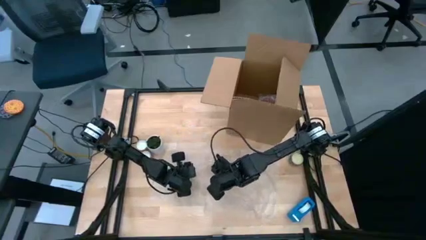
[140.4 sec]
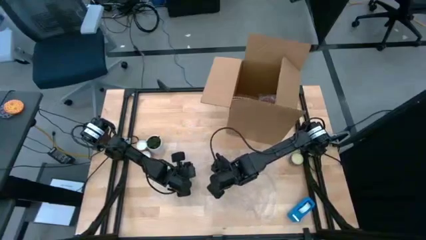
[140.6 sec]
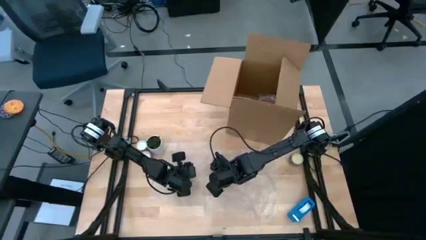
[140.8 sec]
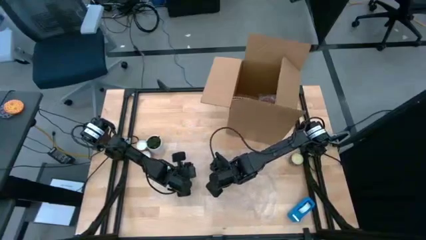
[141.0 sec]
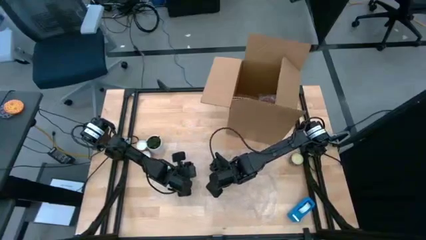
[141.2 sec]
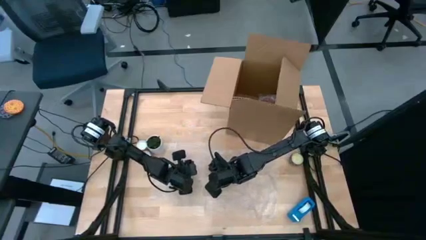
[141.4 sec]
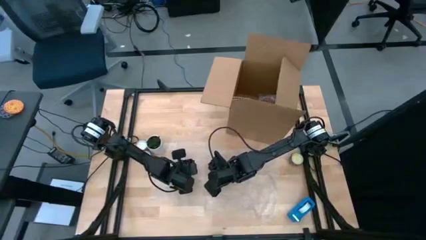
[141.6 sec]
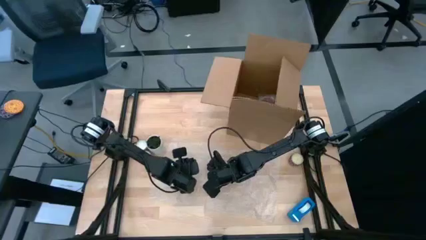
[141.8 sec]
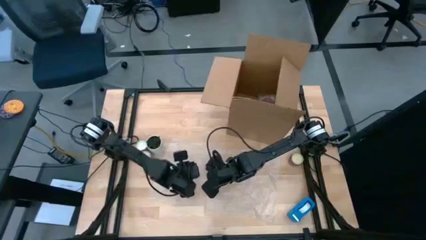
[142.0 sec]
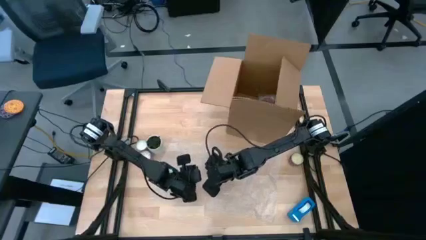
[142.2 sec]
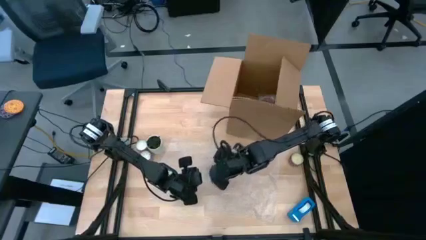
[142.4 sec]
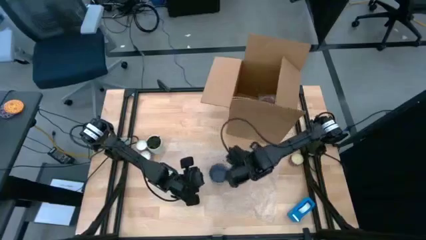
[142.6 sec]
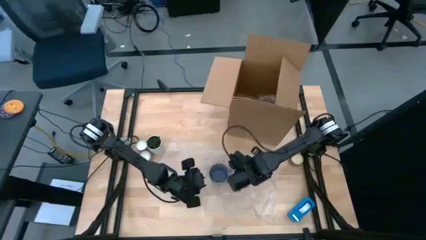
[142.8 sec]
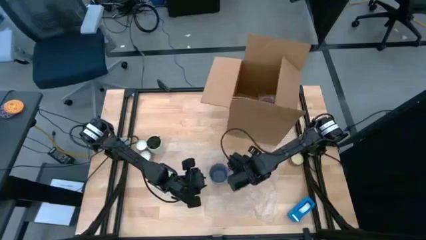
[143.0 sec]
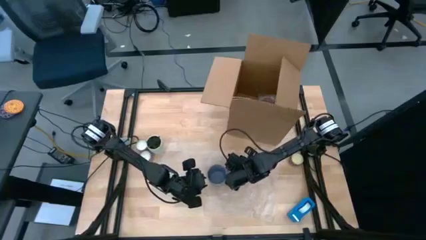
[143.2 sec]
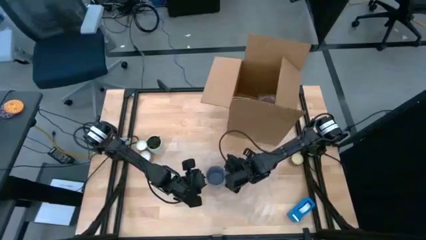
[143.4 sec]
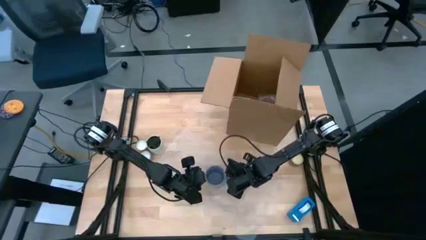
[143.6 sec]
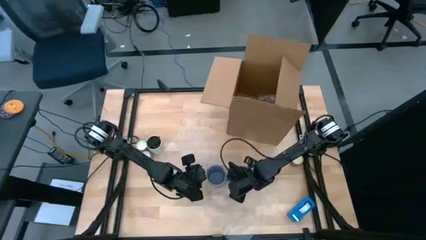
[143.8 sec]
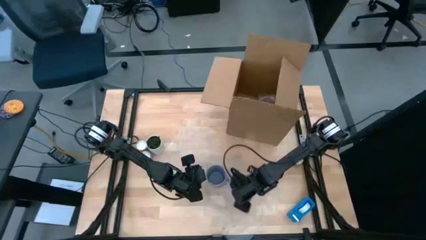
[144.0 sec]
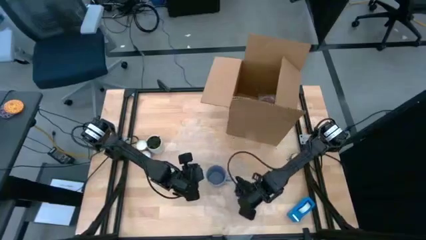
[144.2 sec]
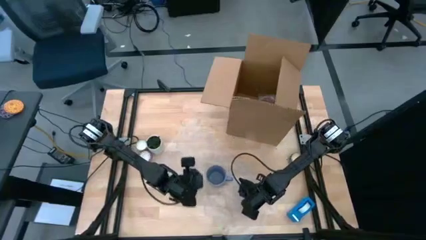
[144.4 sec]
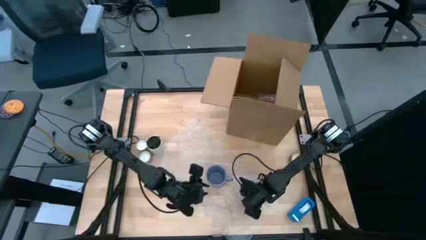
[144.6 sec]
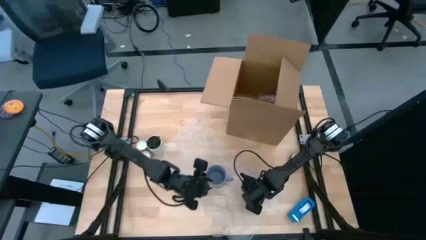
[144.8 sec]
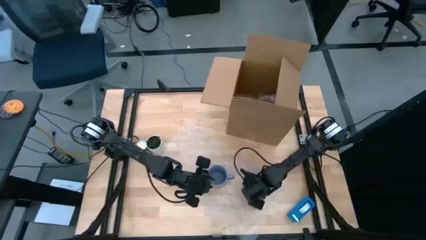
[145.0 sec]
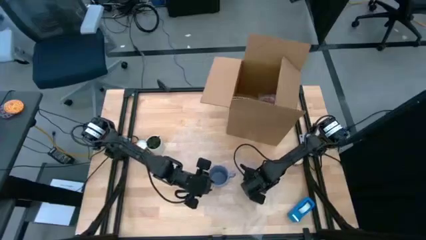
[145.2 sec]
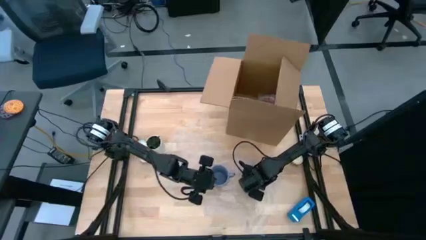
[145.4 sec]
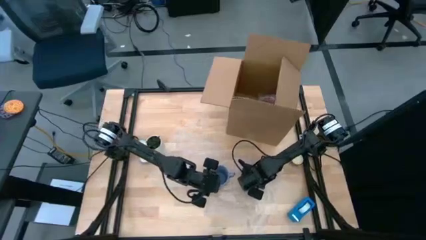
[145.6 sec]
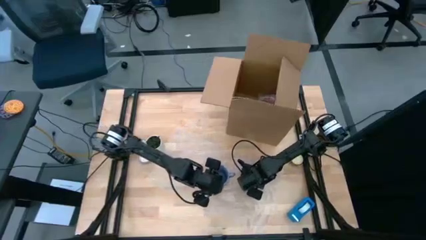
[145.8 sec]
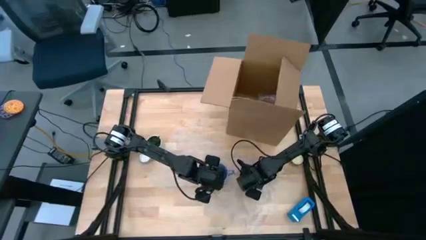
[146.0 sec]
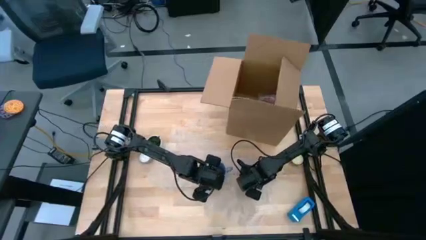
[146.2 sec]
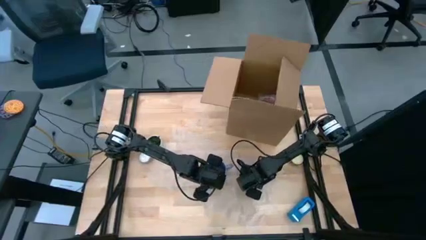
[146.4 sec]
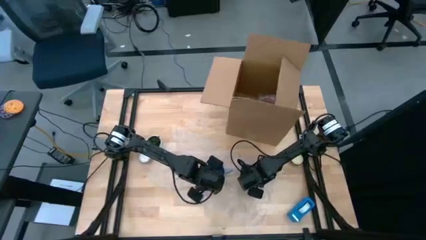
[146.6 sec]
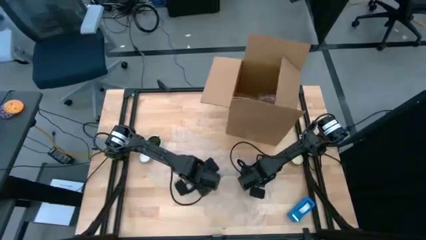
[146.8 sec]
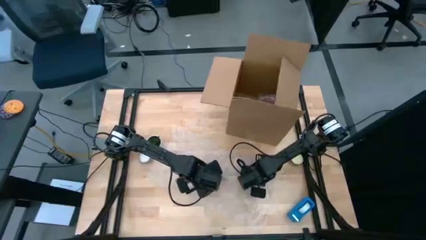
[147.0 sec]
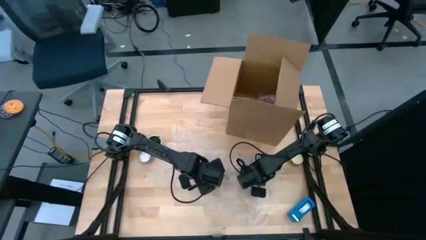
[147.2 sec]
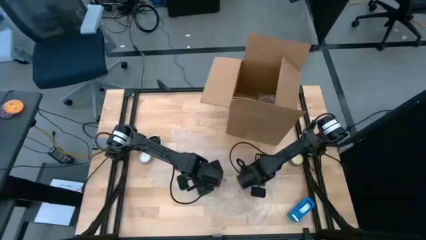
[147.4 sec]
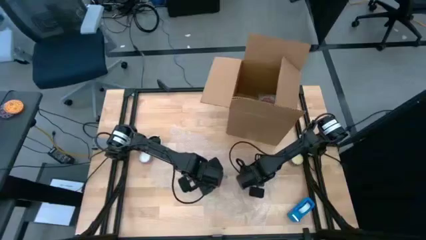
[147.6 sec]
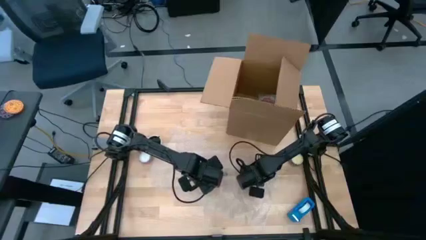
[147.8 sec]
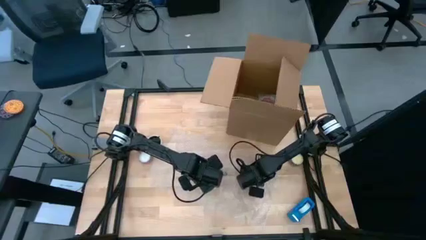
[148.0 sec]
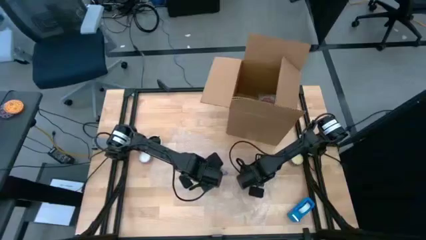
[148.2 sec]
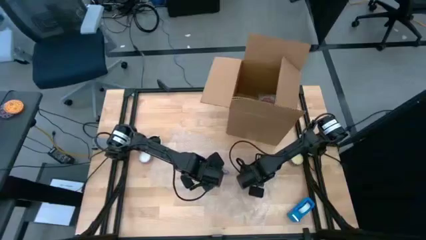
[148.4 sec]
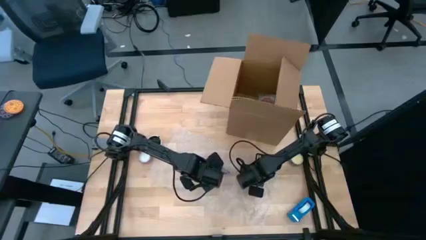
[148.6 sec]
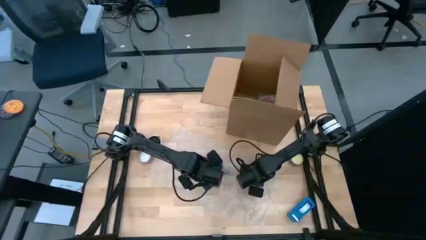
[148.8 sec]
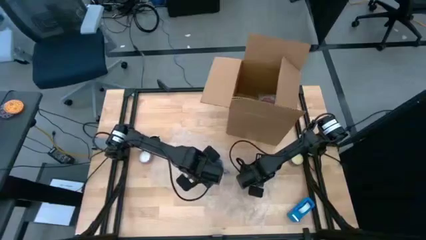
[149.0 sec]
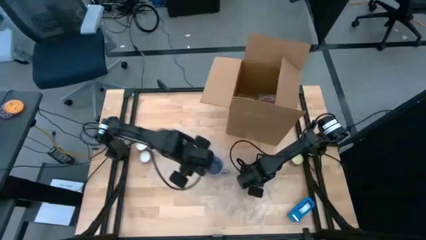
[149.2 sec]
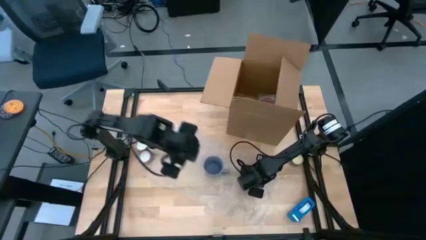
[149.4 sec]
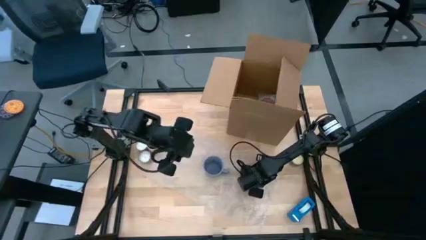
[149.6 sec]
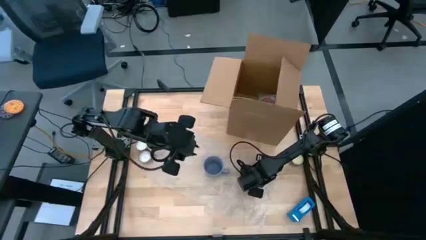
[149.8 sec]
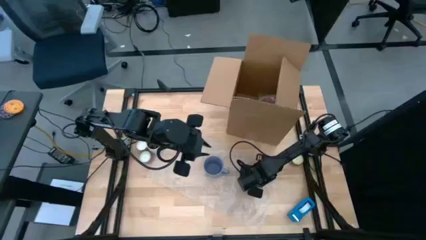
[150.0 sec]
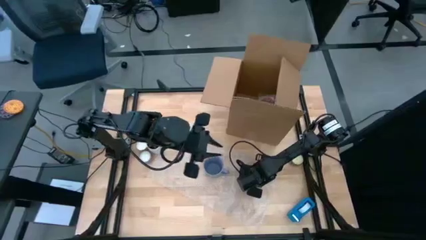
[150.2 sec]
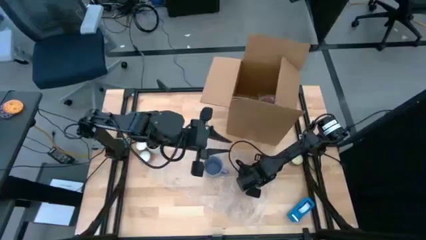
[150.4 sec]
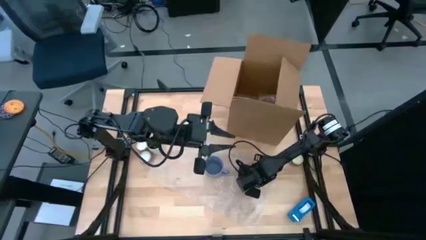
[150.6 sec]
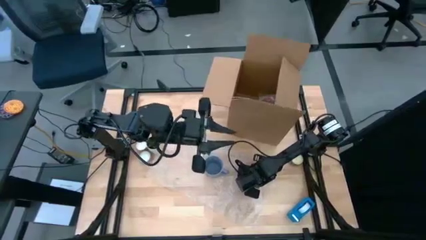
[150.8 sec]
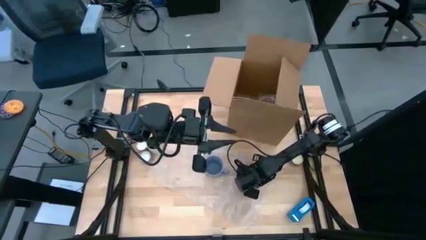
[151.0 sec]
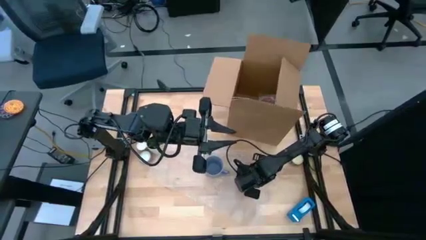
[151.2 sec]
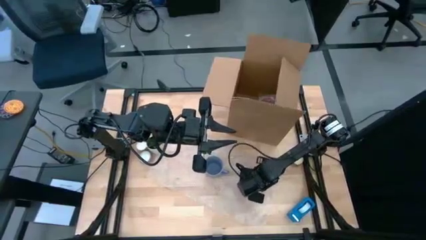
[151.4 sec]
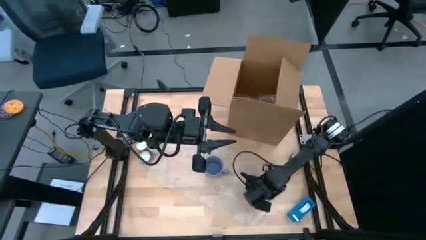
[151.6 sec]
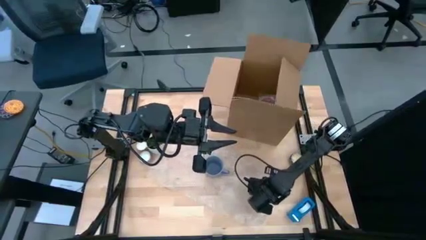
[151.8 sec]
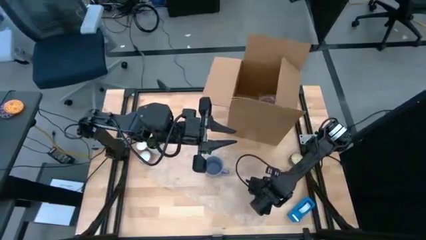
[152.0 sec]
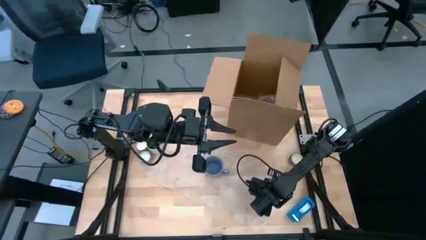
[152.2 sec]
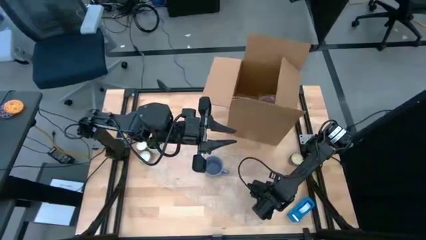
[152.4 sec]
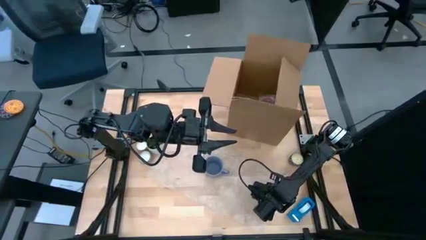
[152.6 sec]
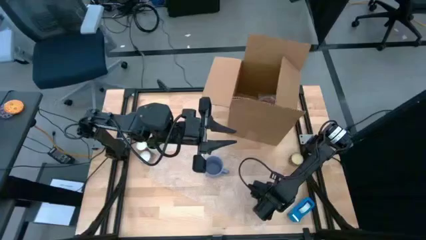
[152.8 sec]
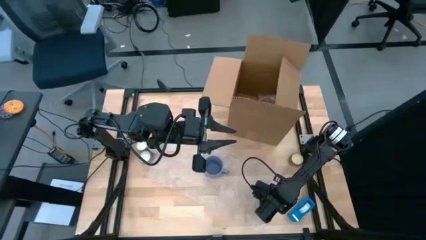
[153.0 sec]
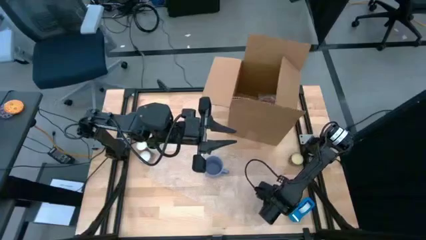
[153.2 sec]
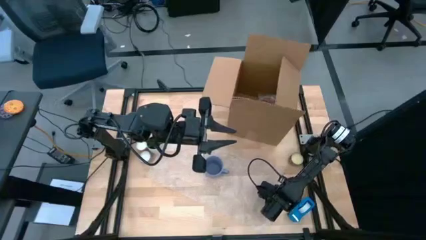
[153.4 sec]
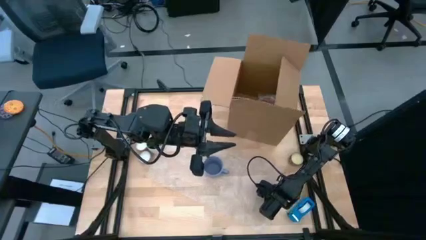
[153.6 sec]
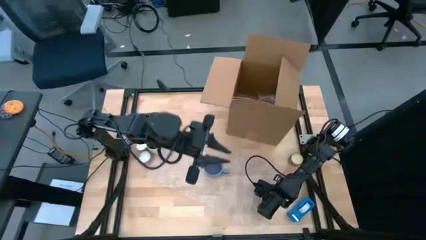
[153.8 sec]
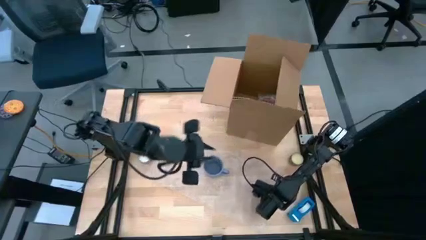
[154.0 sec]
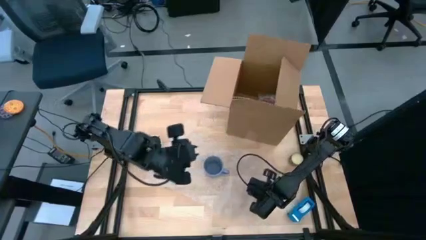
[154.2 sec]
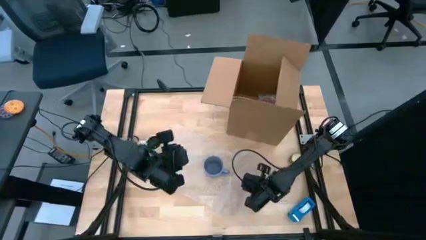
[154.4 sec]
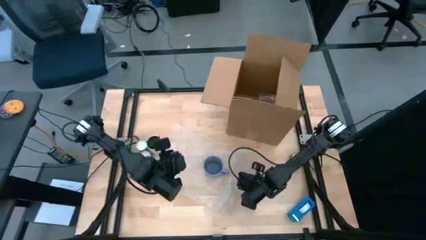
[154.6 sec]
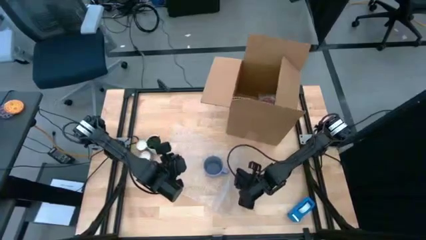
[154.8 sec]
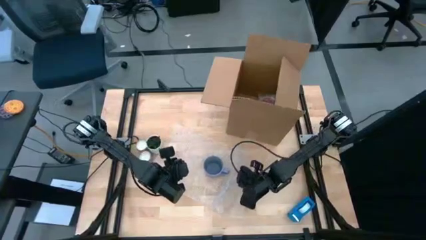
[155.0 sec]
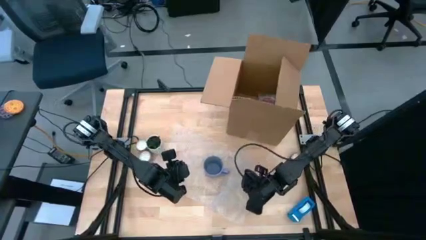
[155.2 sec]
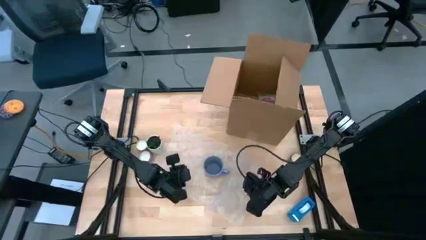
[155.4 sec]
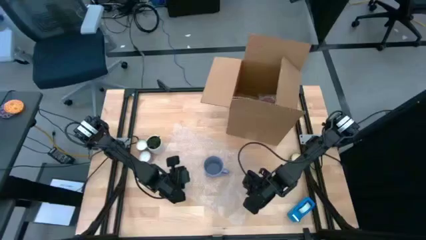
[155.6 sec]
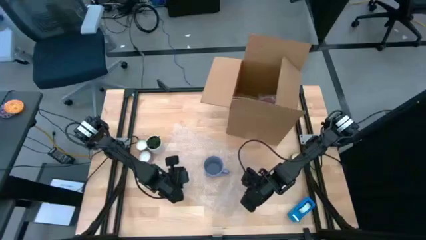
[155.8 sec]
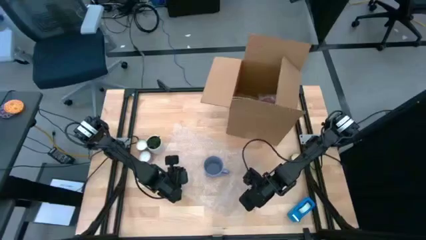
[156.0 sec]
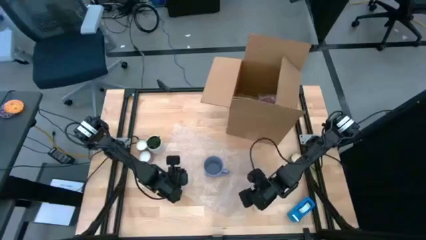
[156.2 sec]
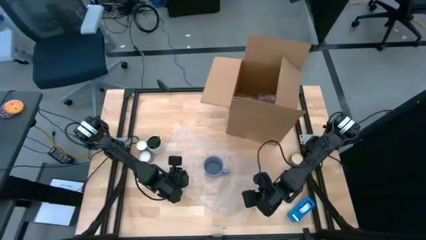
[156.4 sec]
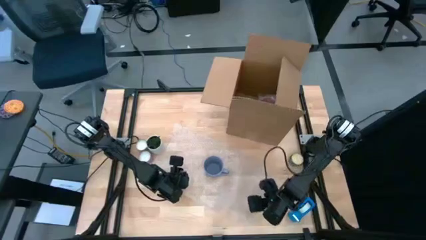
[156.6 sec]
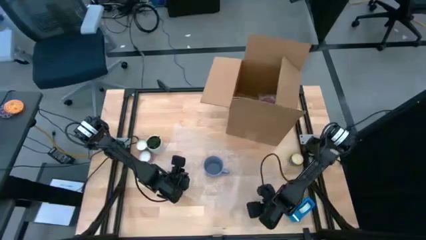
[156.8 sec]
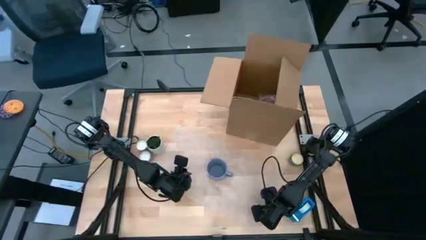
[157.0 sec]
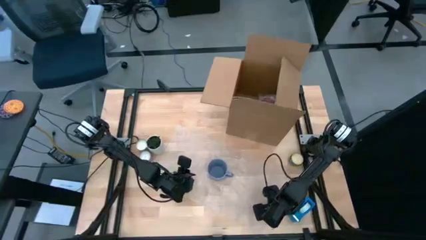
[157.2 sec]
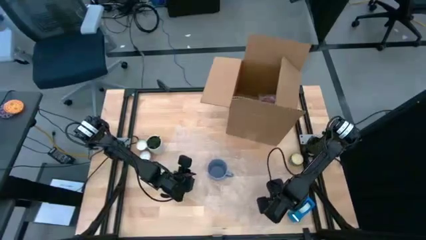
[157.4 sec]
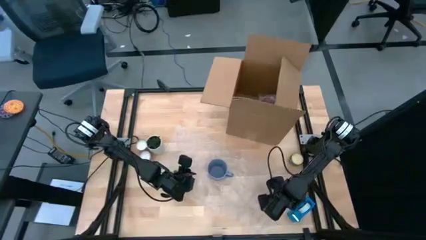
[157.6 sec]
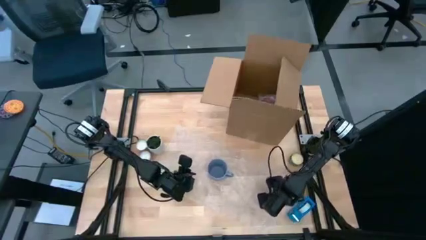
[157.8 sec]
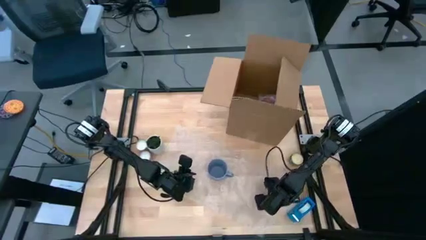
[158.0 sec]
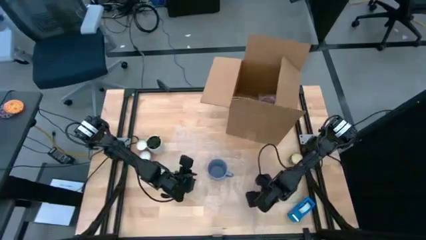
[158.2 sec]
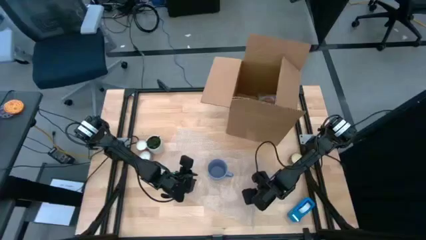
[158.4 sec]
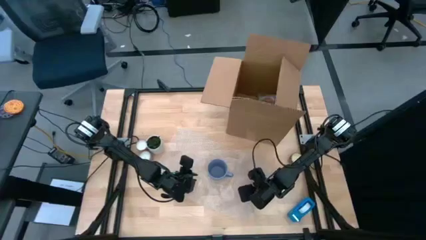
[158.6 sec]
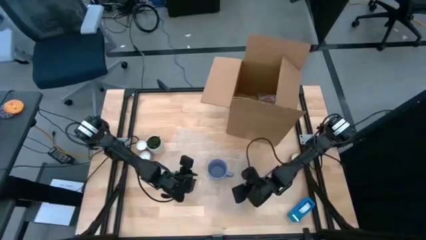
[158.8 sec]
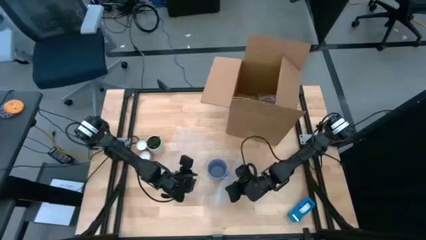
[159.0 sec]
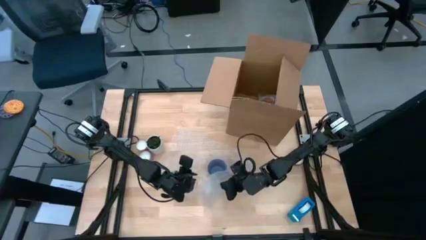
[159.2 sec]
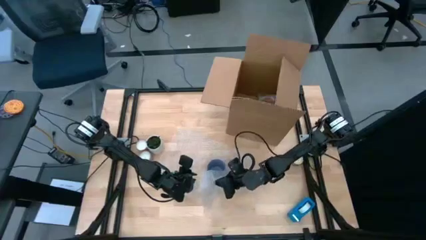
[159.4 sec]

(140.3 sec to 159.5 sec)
Task: wrap mug
Wrap the purple mug with the bubble wrap
